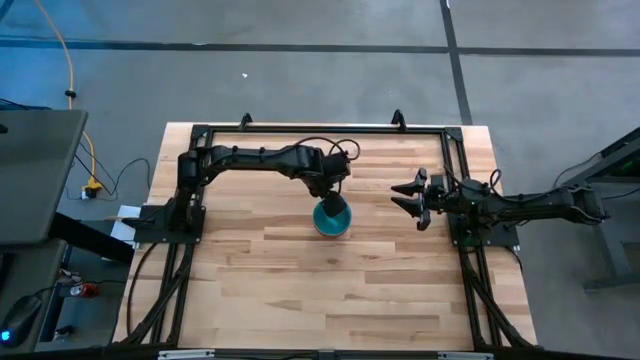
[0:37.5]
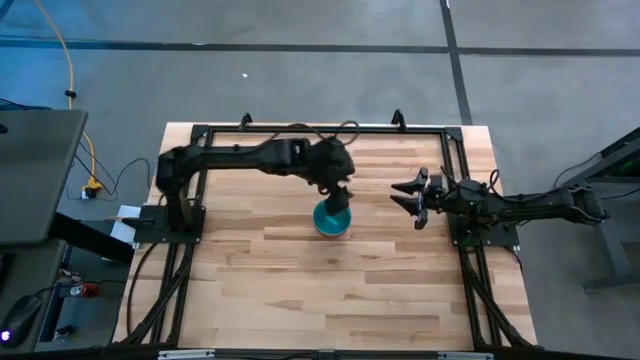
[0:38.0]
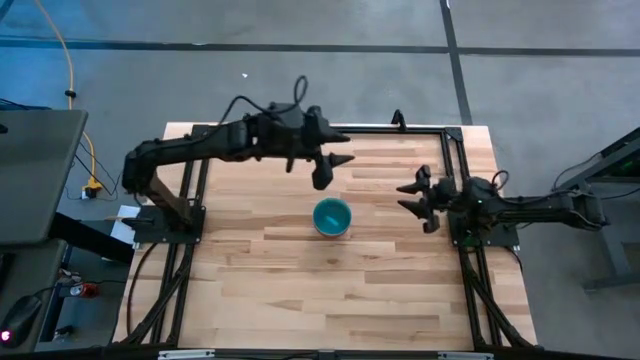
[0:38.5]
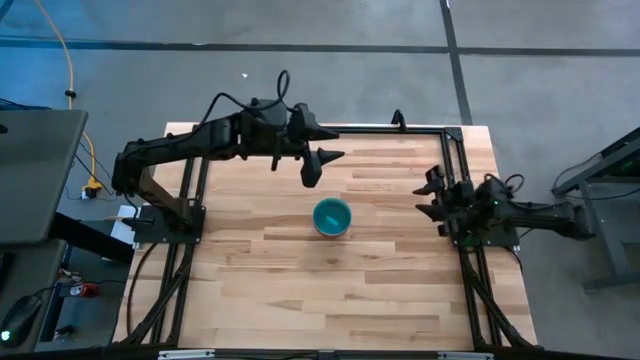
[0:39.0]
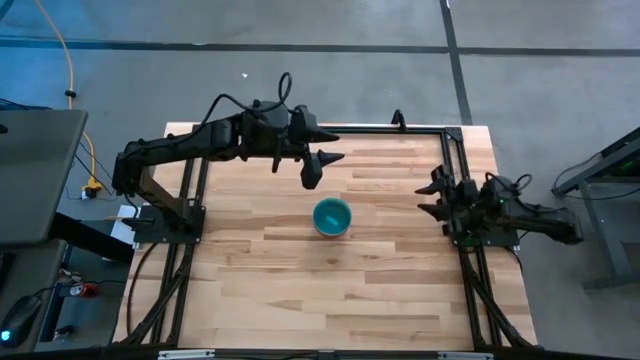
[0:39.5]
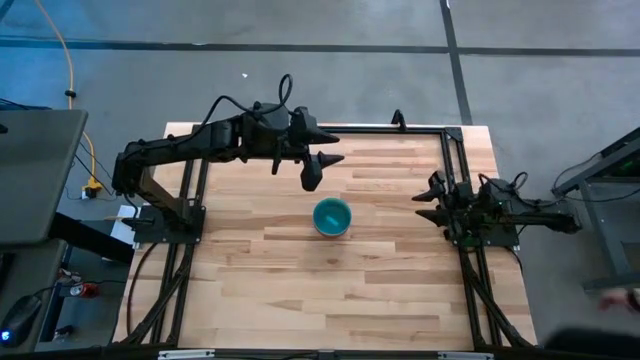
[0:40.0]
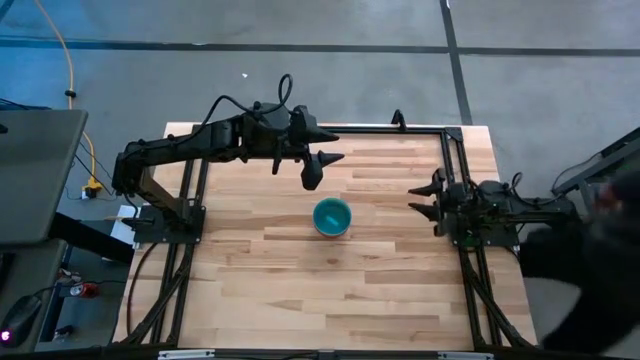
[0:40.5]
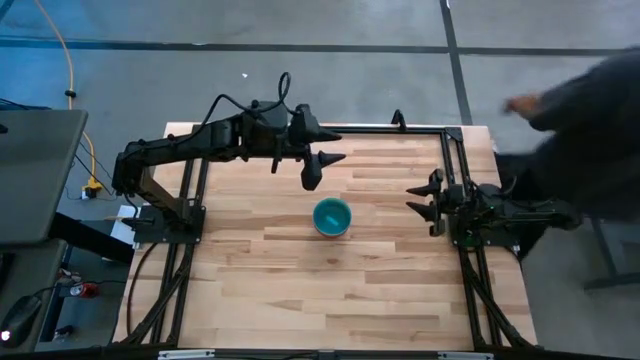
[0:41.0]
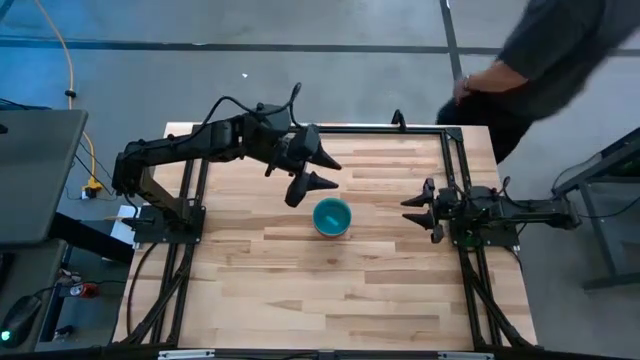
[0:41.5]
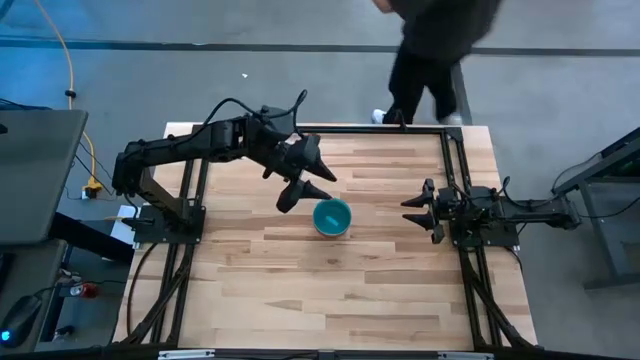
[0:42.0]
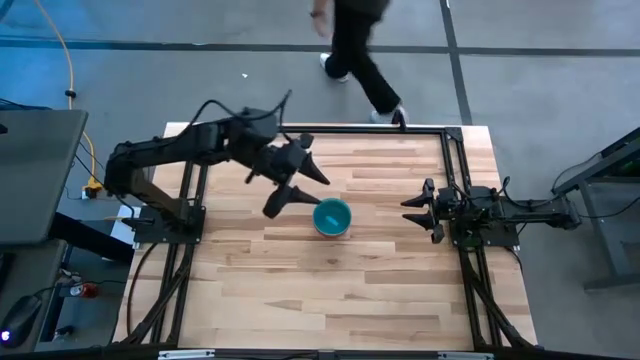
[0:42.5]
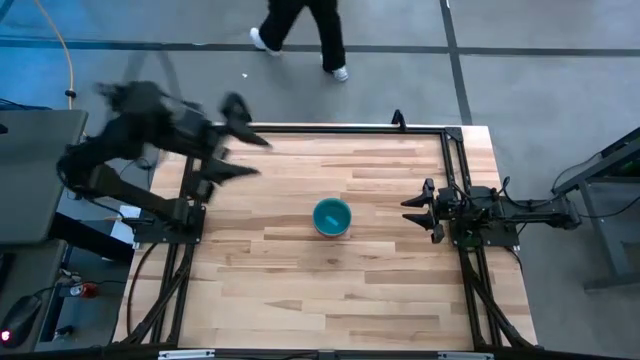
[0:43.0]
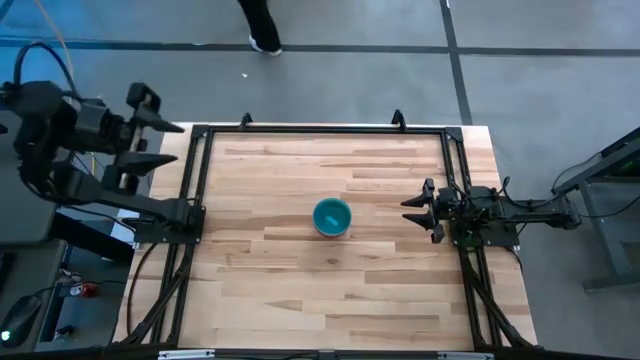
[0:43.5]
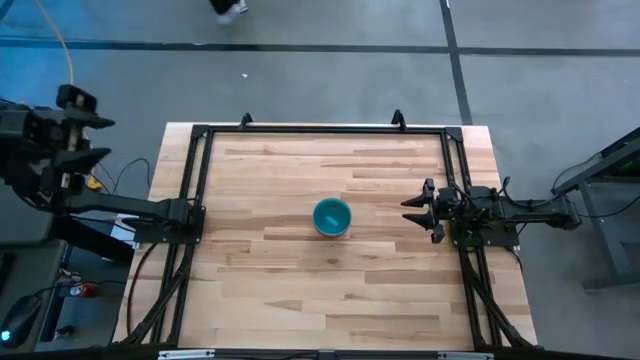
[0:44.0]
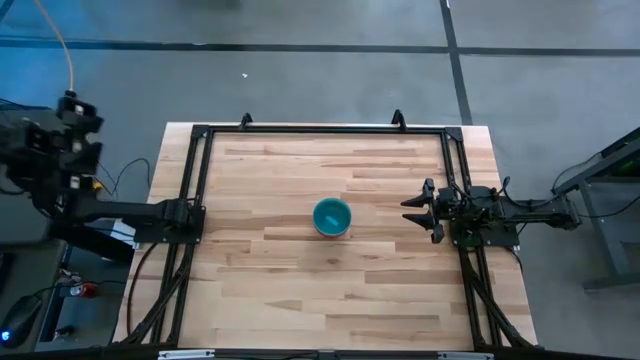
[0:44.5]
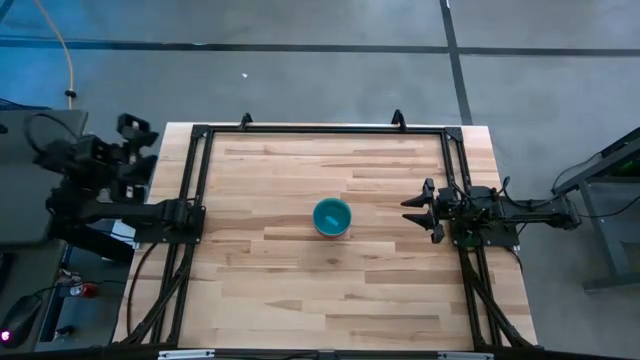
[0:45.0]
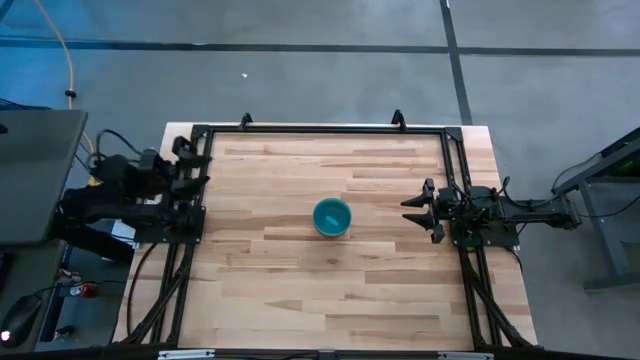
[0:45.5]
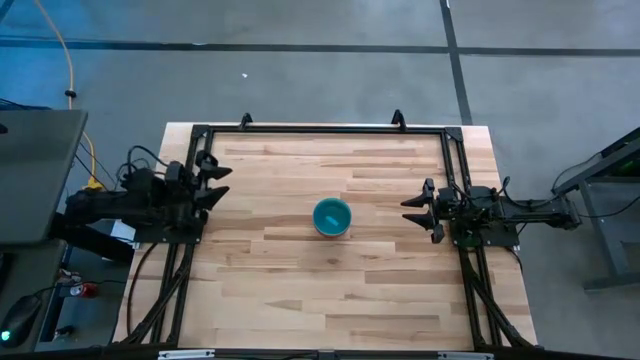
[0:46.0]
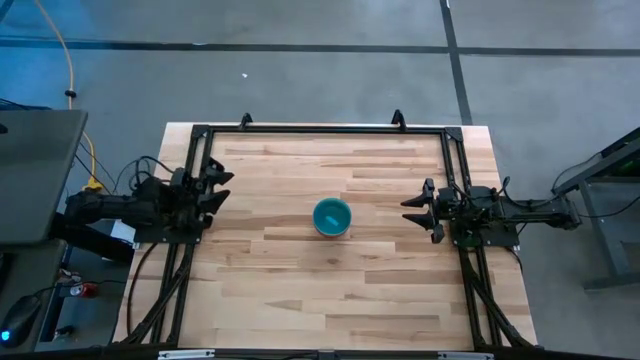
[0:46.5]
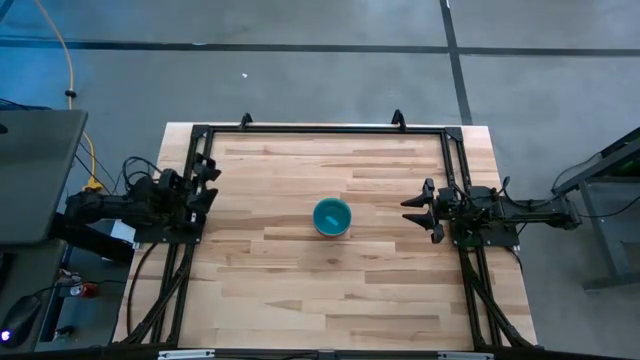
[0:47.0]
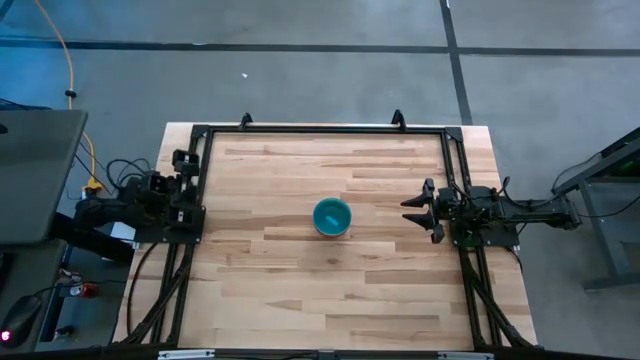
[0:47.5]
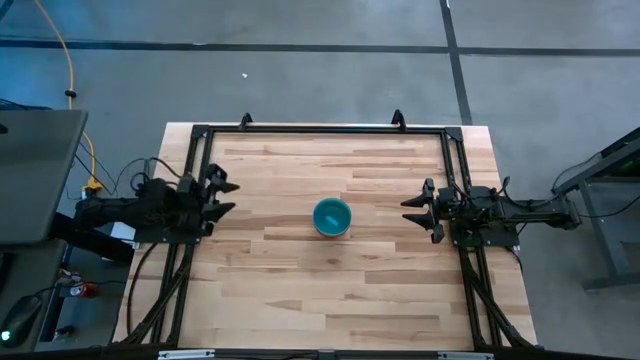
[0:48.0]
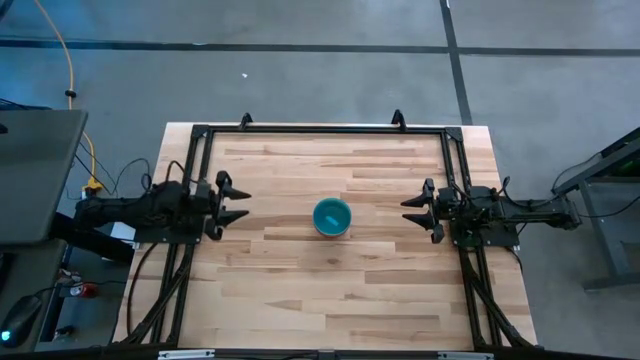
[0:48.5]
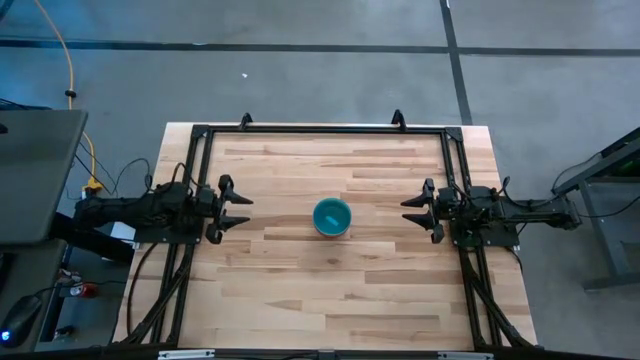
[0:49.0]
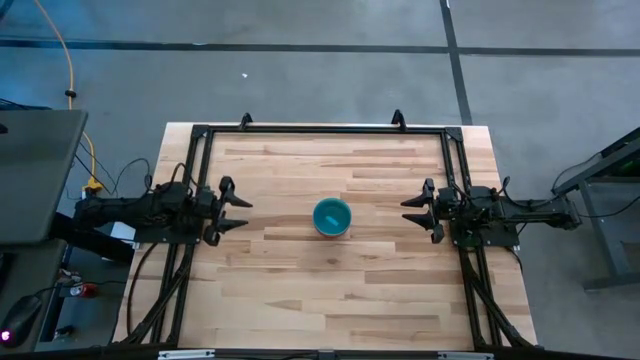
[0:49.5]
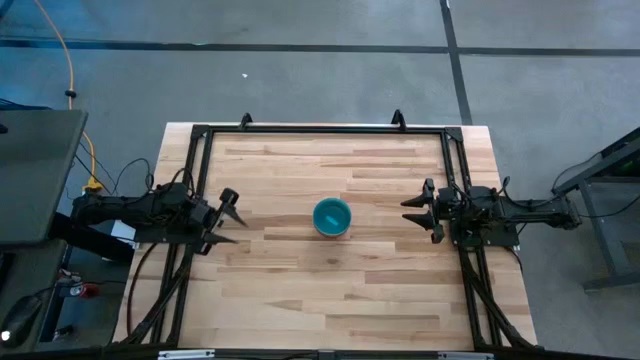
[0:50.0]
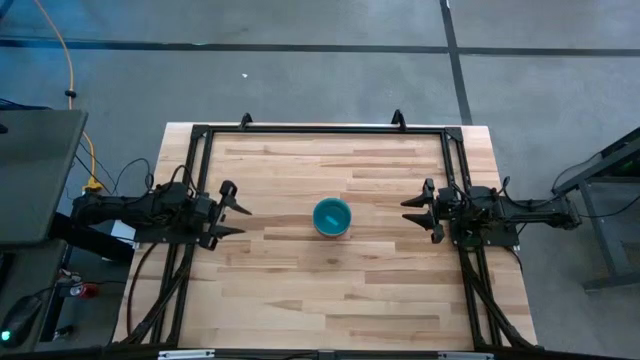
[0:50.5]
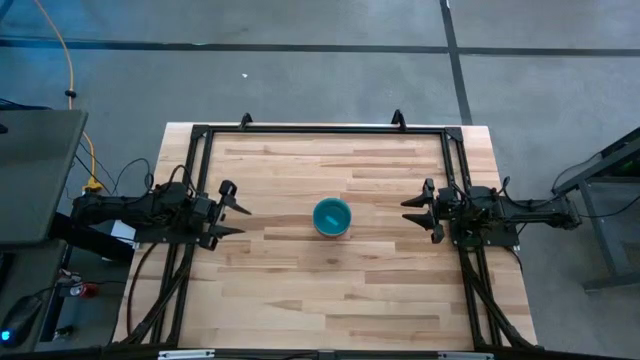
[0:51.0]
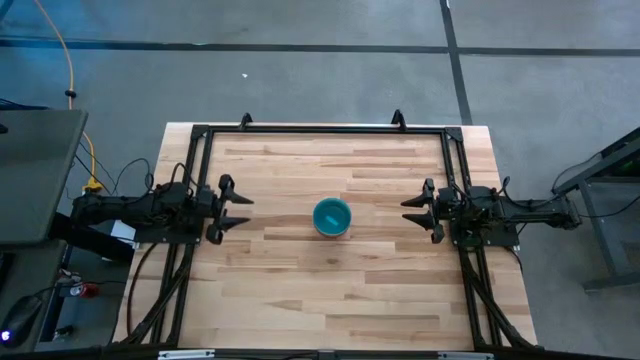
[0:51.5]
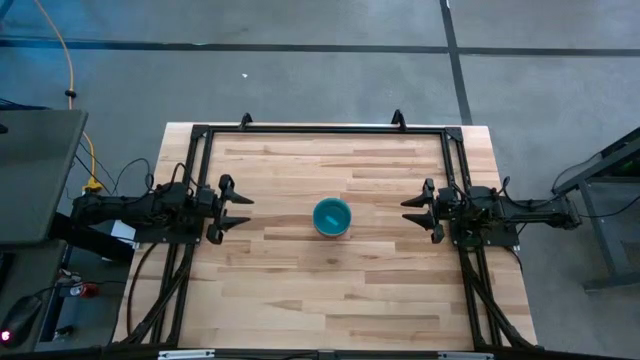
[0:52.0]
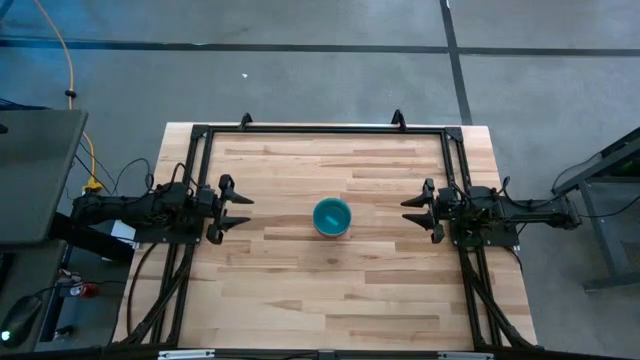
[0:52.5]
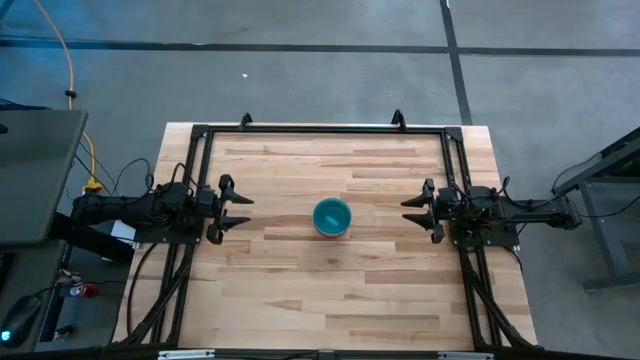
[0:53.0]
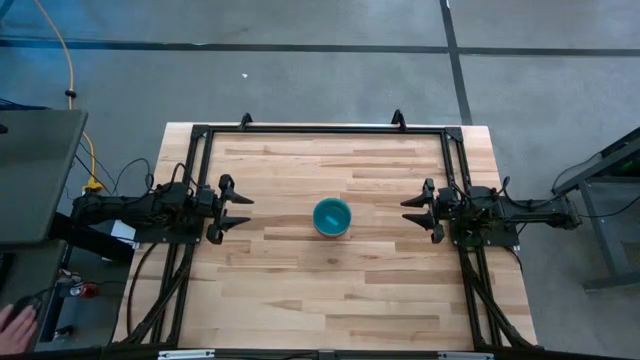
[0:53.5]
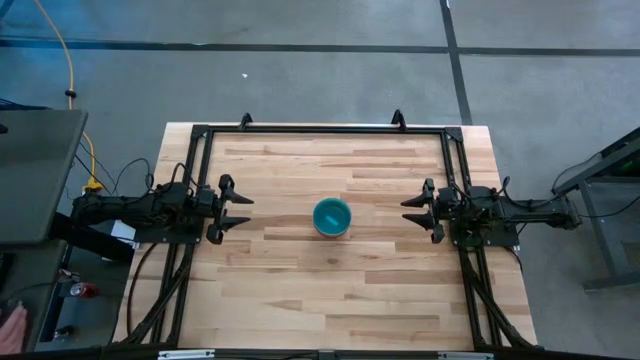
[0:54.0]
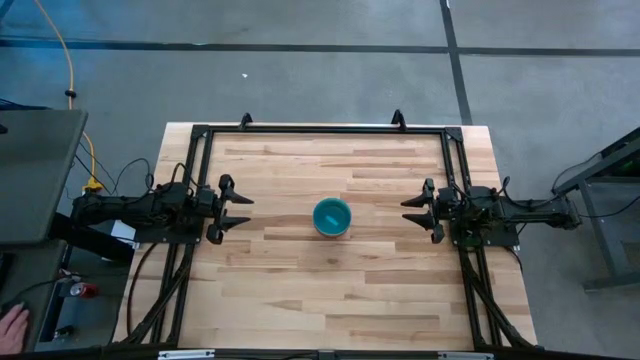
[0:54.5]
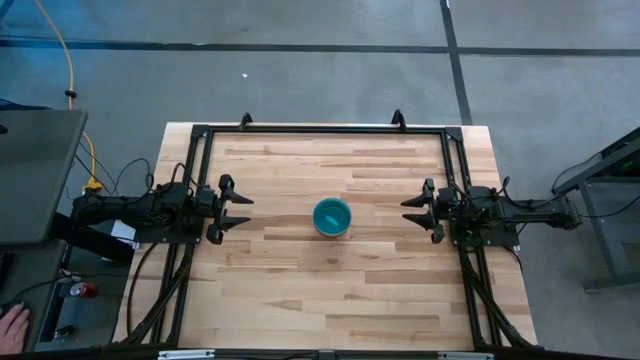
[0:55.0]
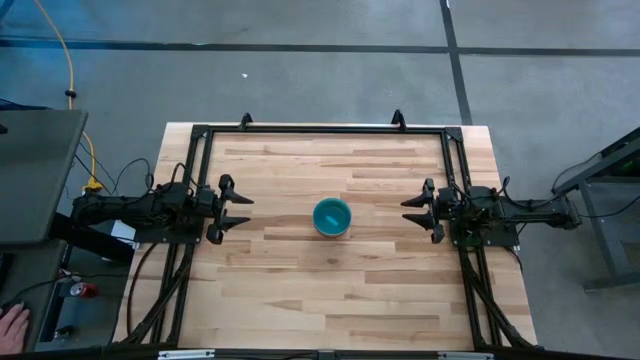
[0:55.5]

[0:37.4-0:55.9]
Task: Nest bowls inside each other
Return to Home Position

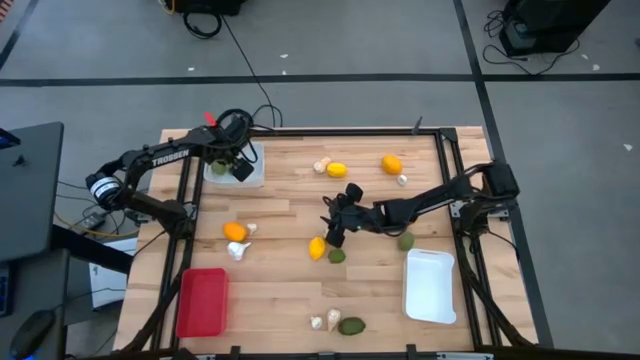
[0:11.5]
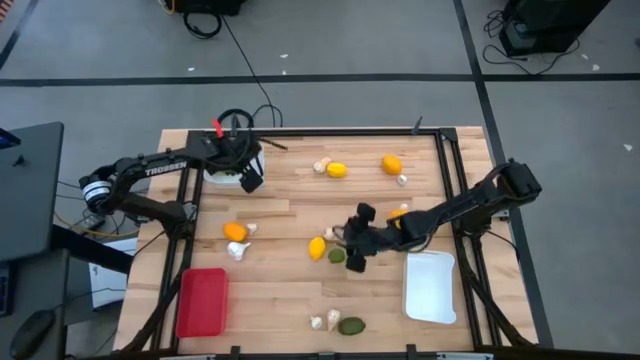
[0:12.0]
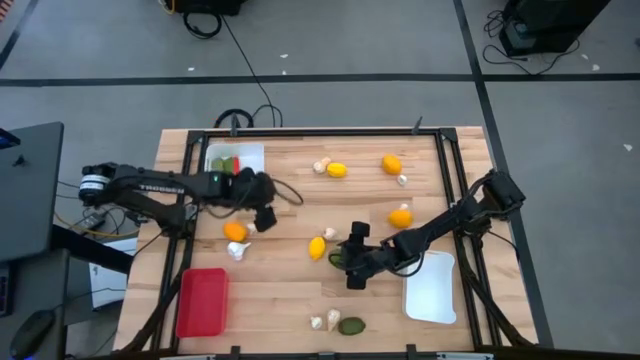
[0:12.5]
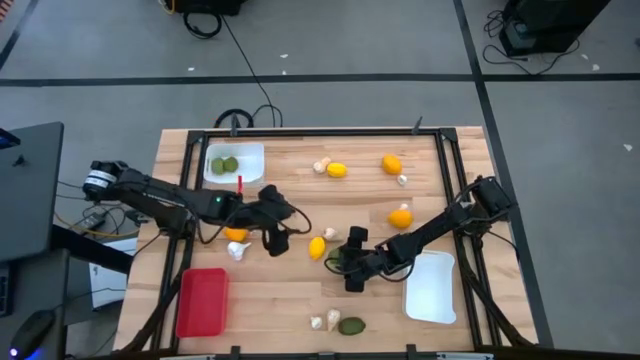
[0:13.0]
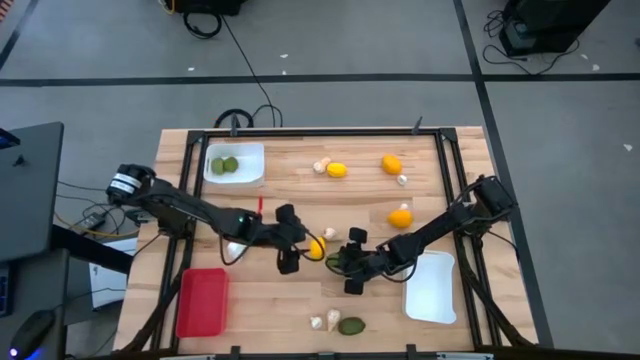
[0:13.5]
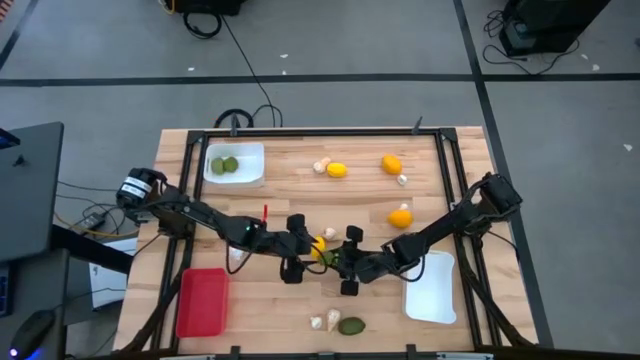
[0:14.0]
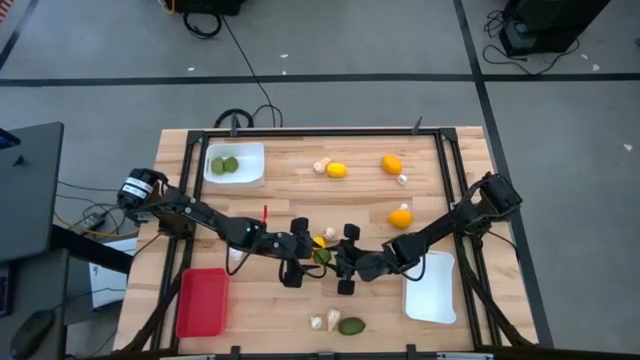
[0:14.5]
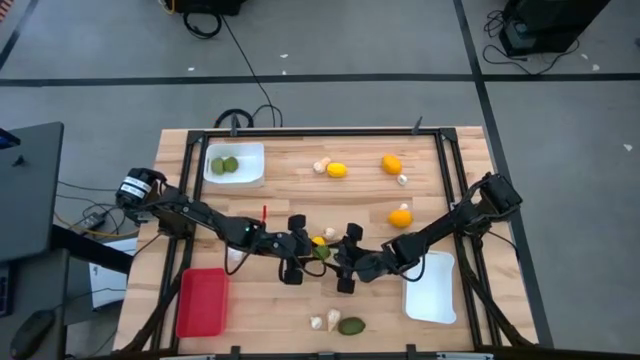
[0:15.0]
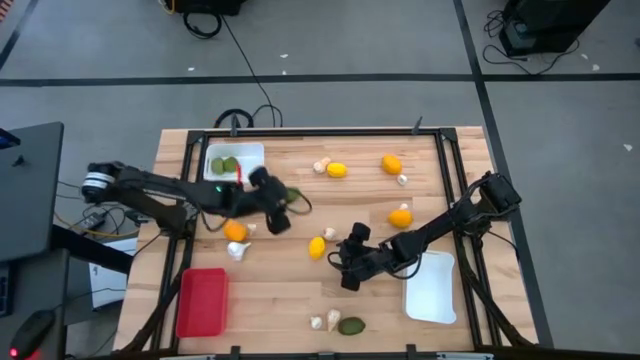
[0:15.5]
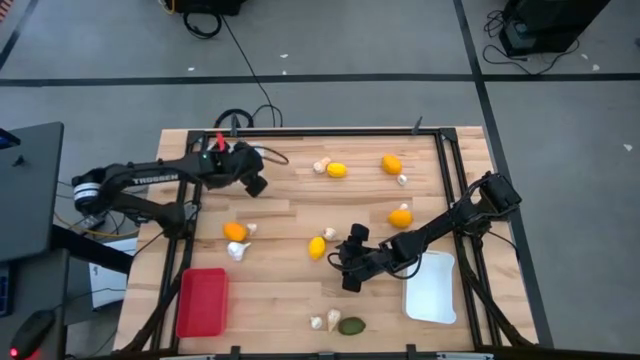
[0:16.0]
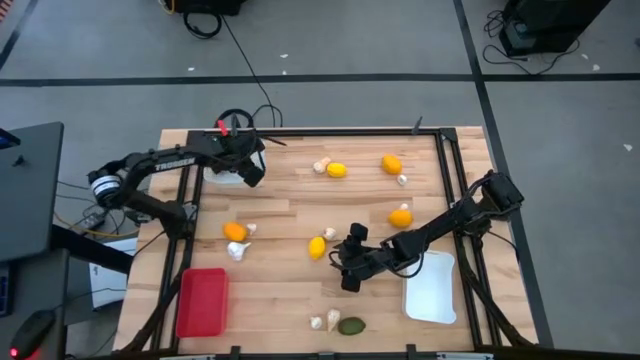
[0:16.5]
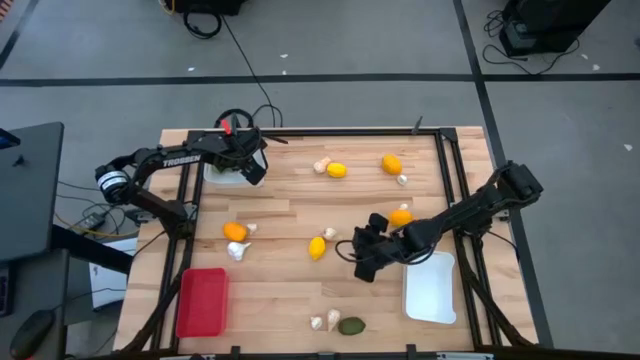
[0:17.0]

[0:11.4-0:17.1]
Task: Sort produce into baskets
Put the top left green lime into the top white bin
